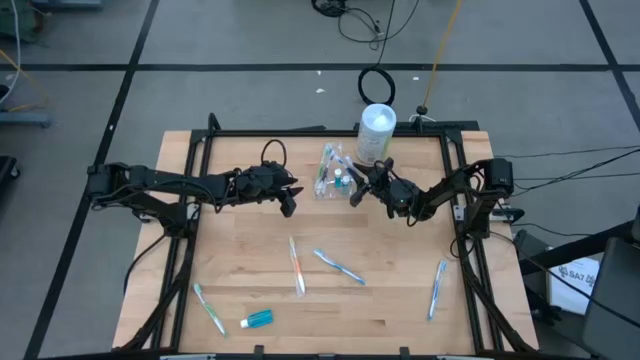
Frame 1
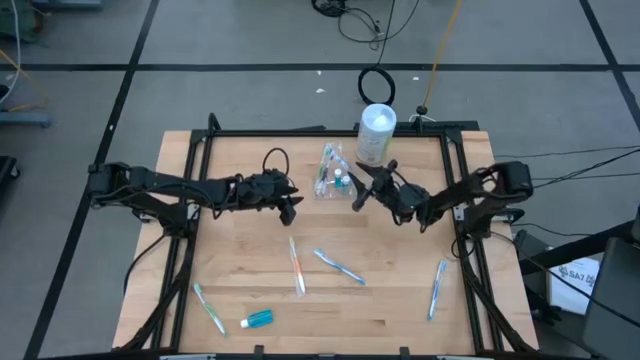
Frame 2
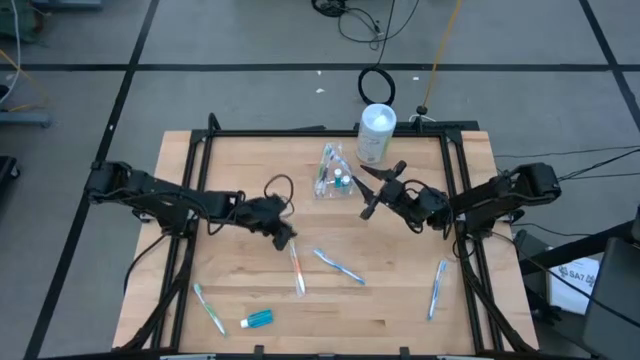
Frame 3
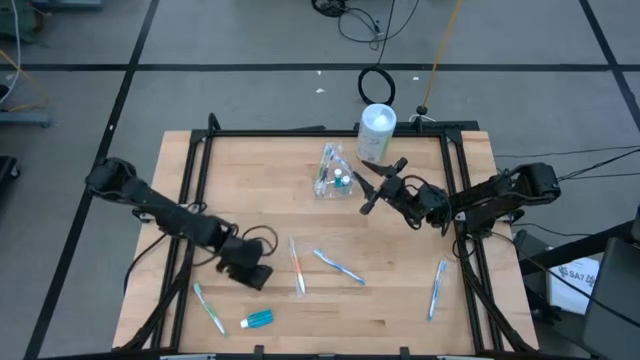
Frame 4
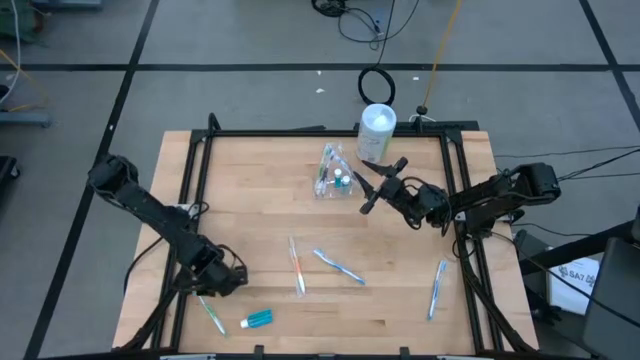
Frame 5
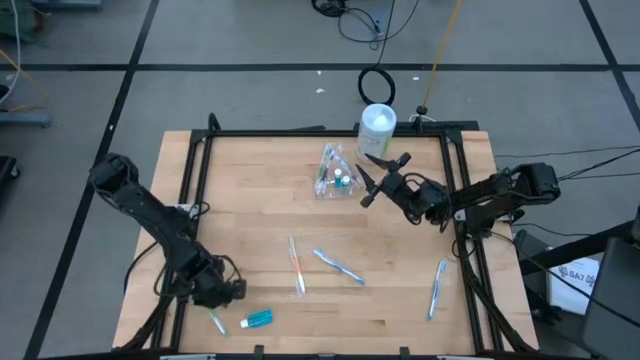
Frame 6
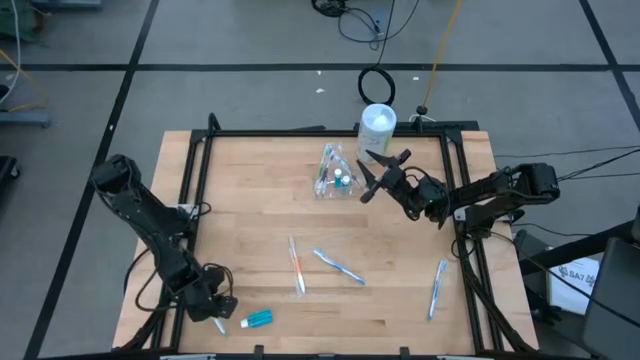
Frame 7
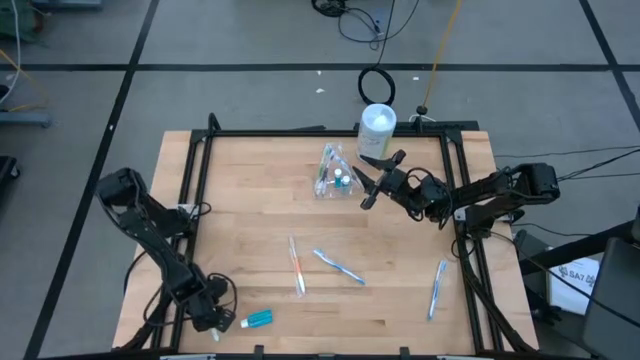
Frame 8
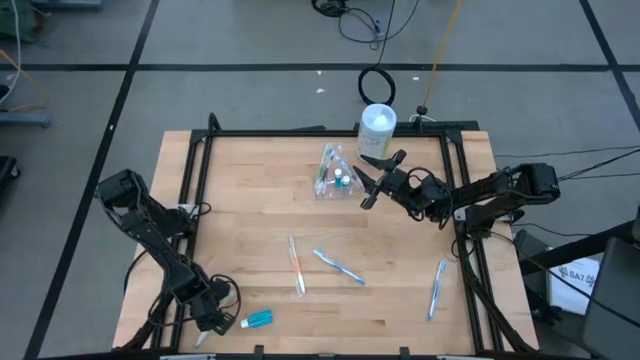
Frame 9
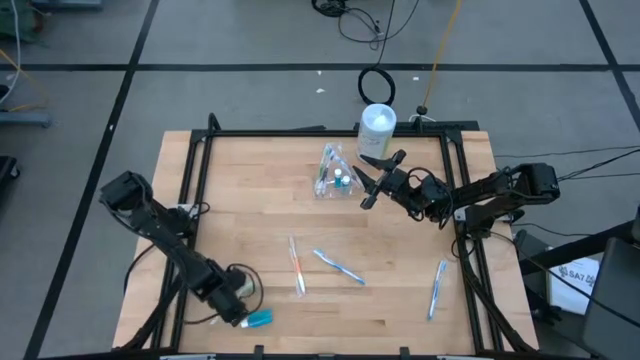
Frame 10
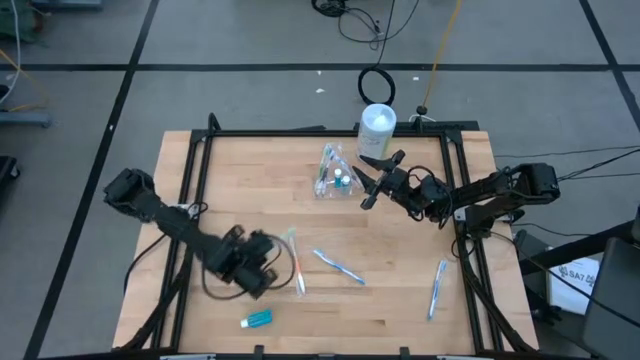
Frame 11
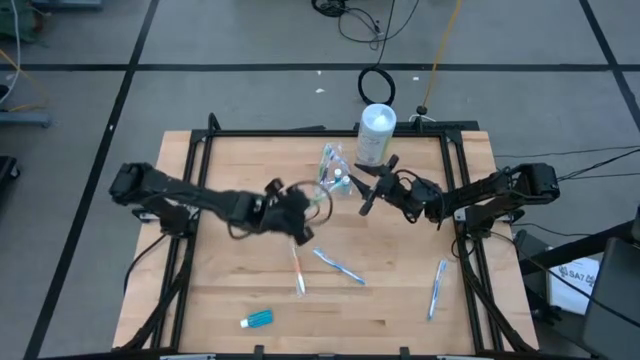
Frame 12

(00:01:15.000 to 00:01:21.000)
Task: Pick & Place toothbrushing station
Put the green toothbrush into the transparent organizer

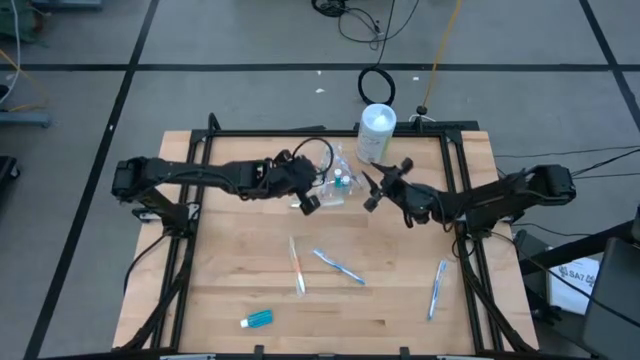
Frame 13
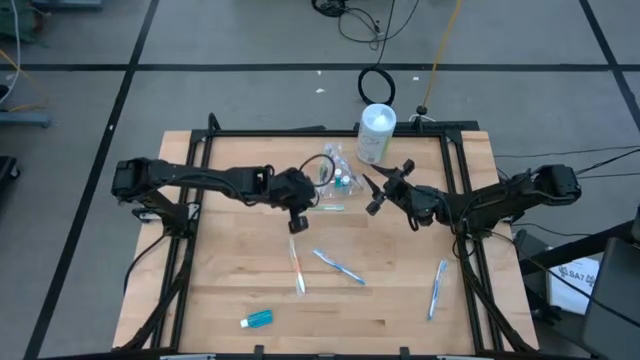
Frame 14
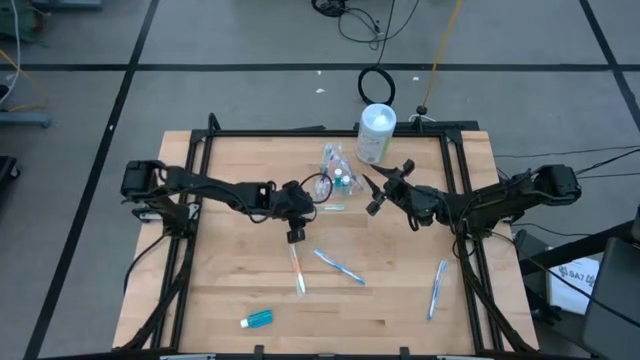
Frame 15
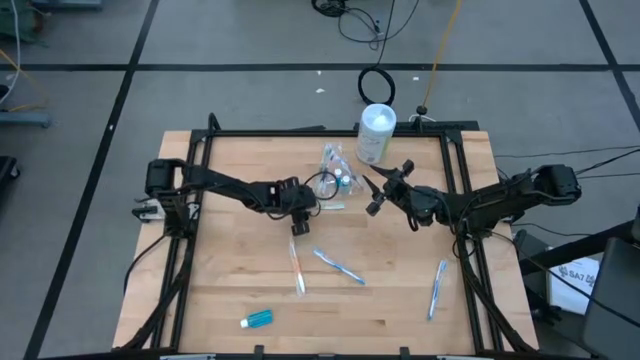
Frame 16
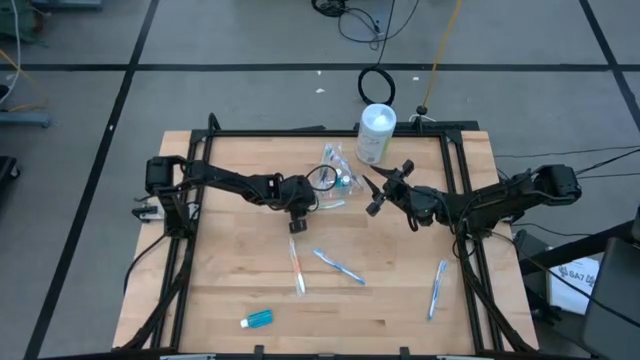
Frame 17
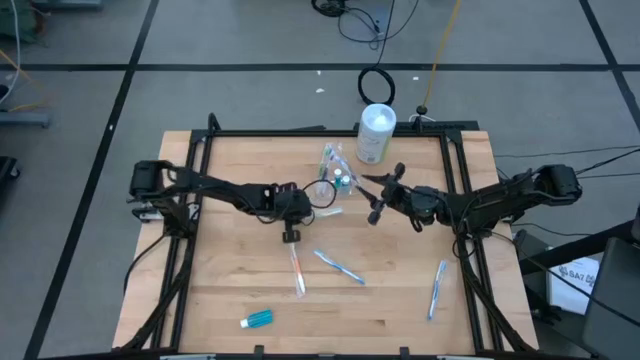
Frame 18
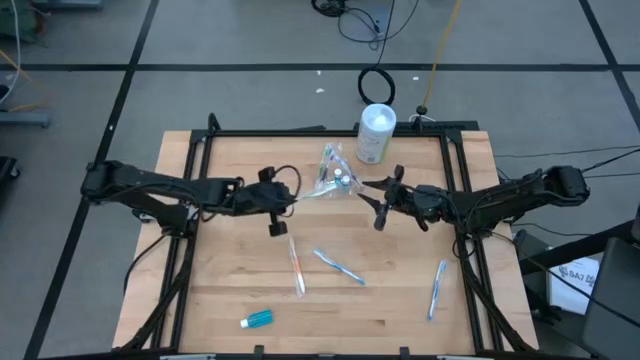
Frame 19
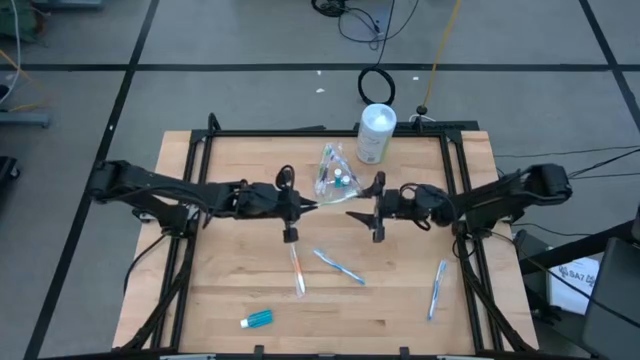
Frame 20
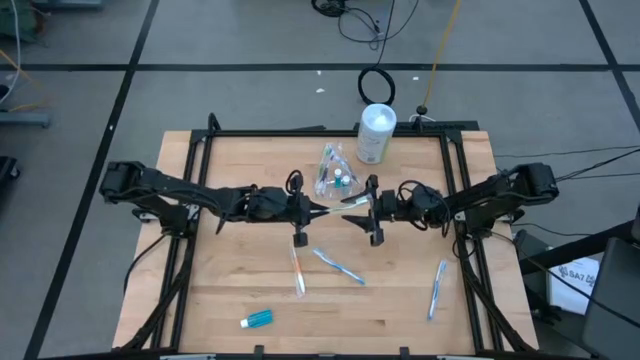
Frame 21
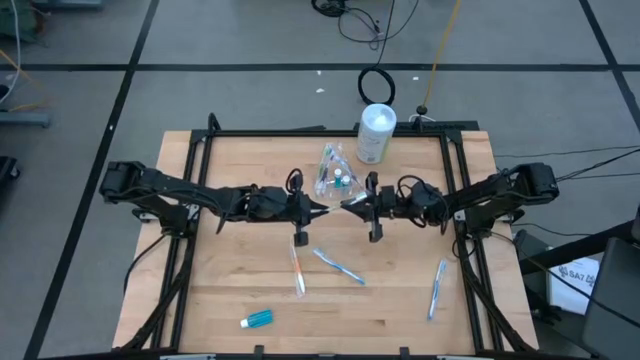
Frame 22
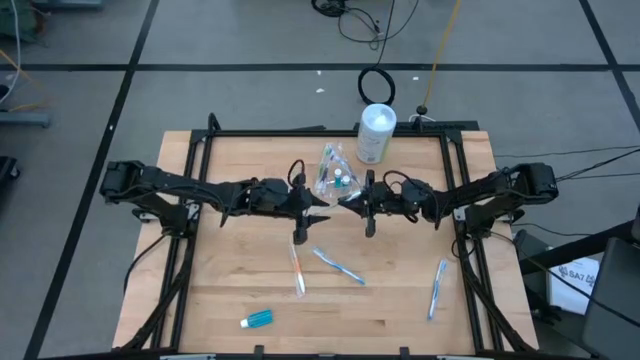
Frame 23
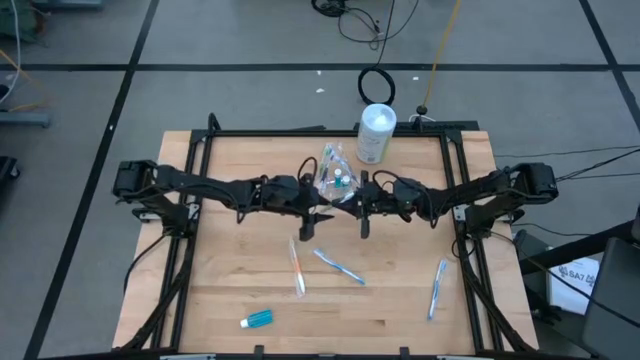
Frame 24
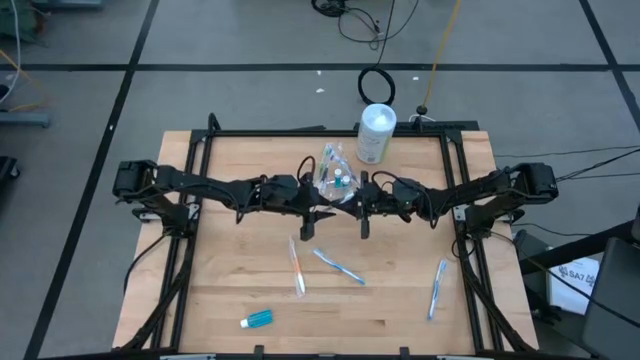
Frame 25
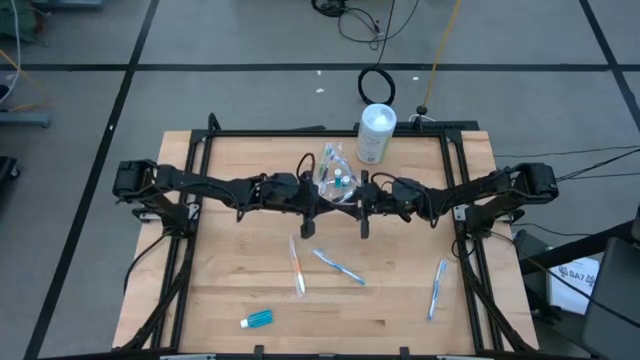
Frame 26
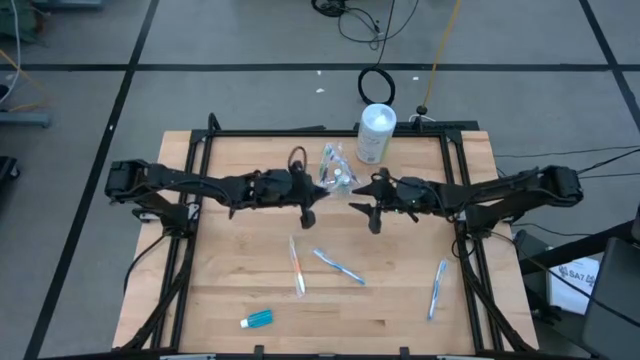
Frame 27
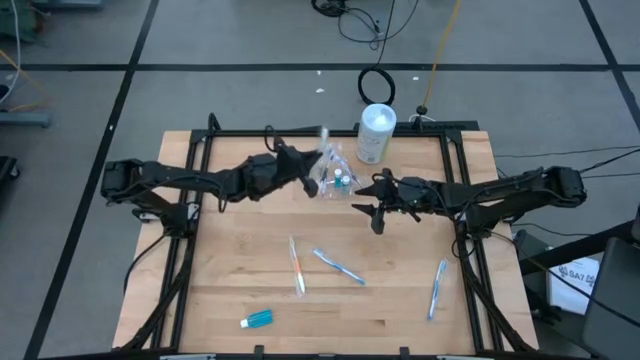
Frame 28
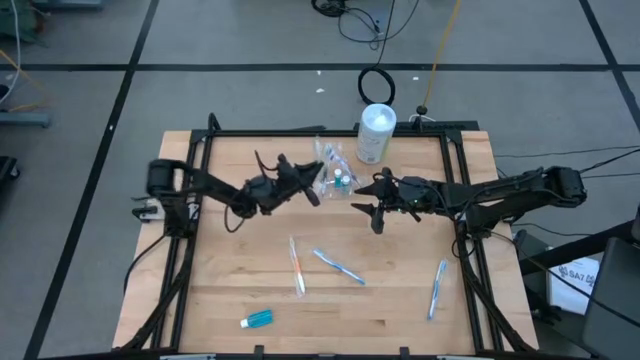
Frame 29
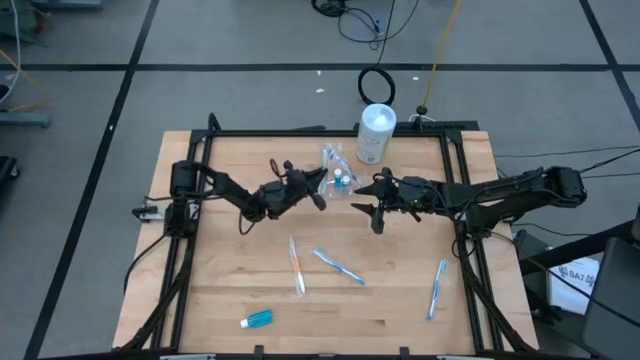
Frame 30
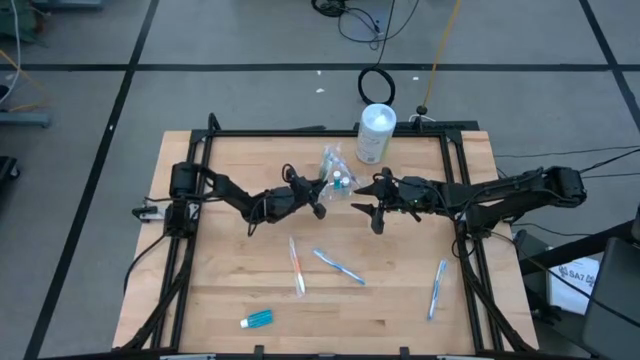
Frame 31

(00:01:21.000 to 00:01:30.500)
Put the green toothbrush into the transparent organizer

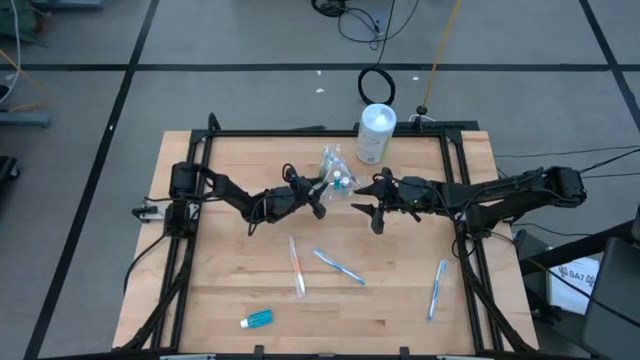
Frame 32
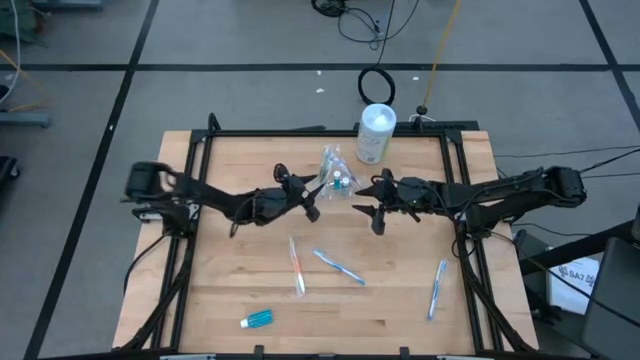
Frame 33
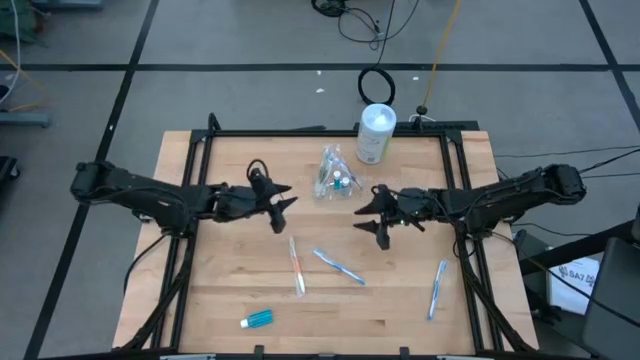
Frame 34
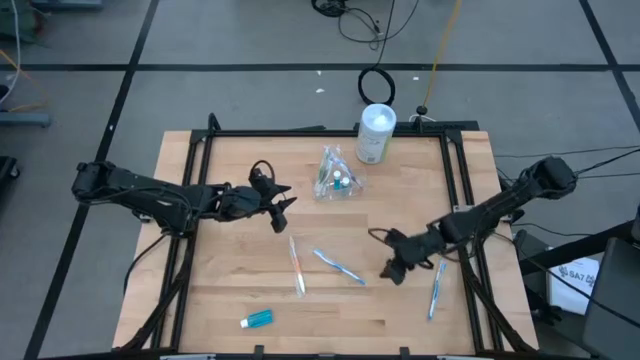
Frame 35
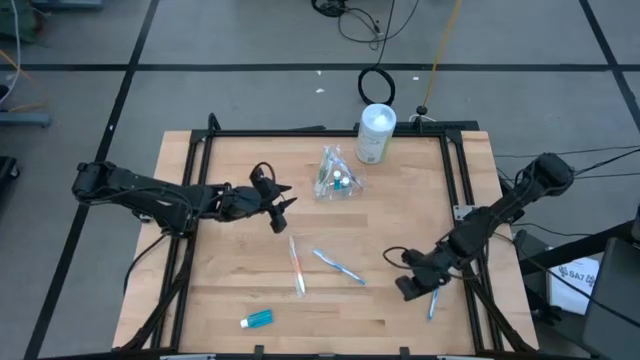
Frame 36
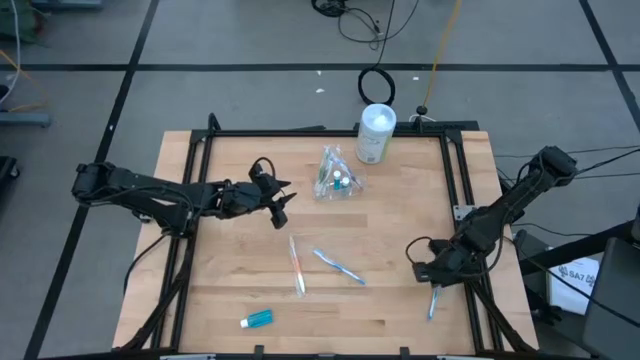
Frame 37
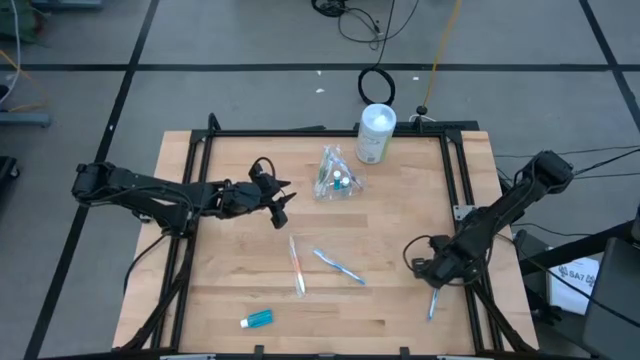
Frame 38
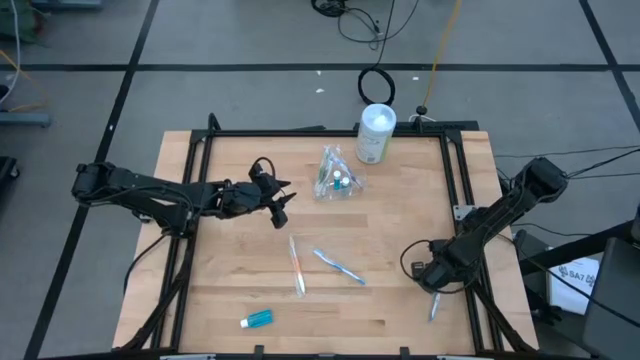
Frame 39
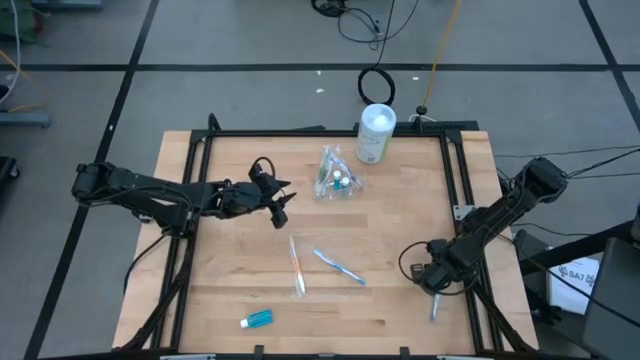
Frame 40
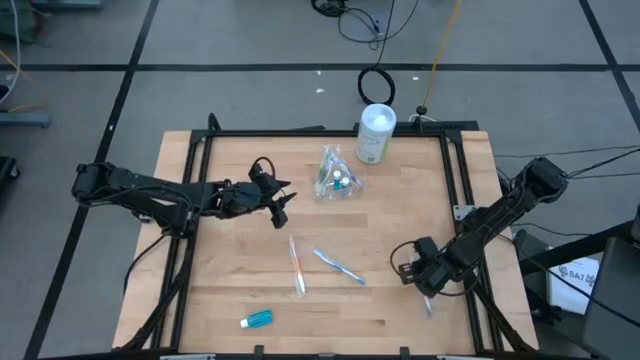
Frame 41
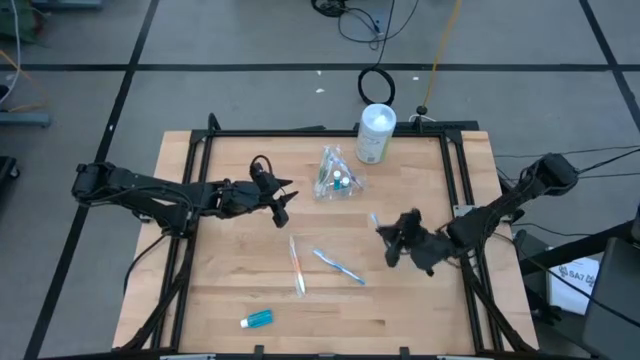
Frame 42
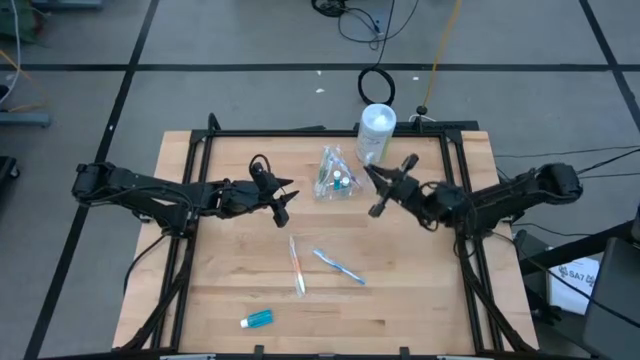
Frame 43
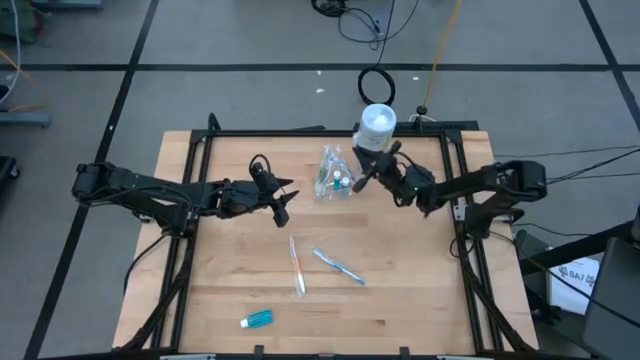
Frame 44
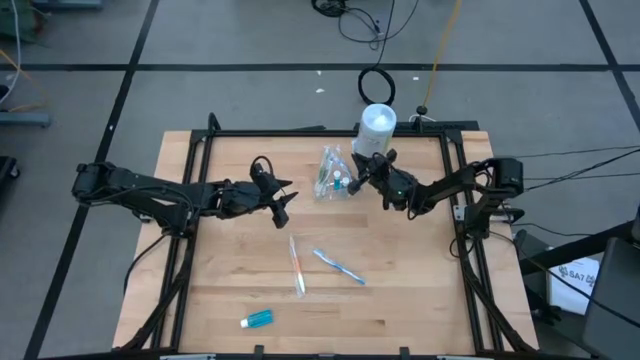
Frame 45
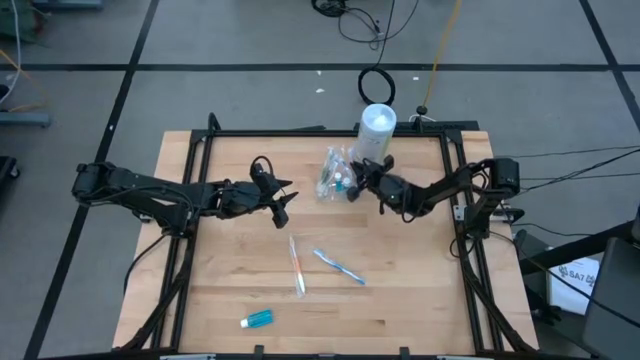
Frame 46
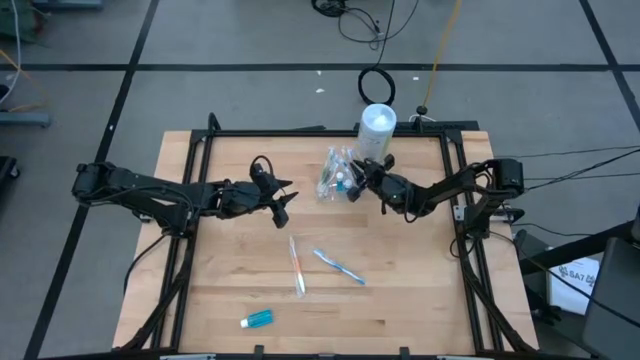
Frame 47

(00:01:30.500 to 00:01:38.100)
Put the right blue toothbrush into the transparent organizer
